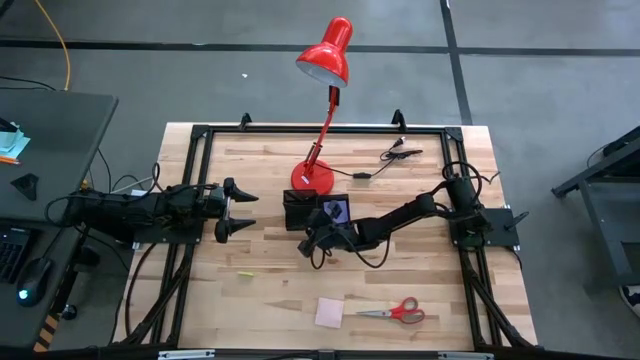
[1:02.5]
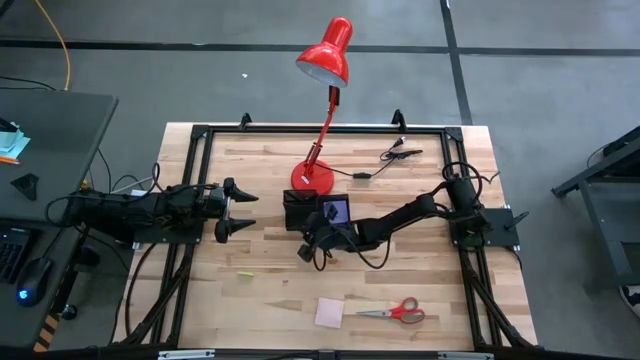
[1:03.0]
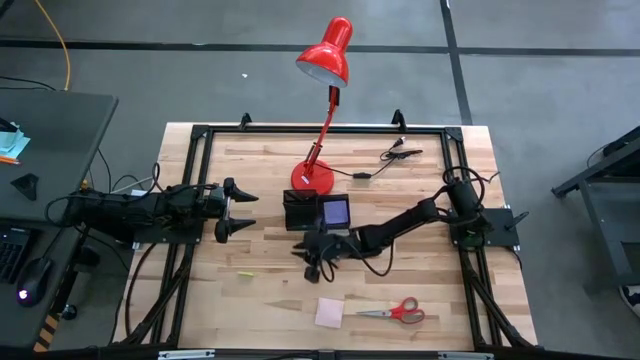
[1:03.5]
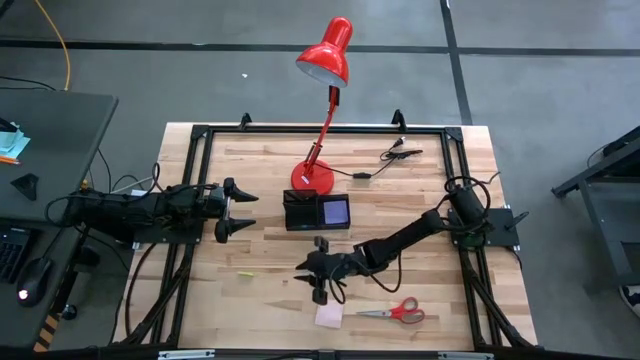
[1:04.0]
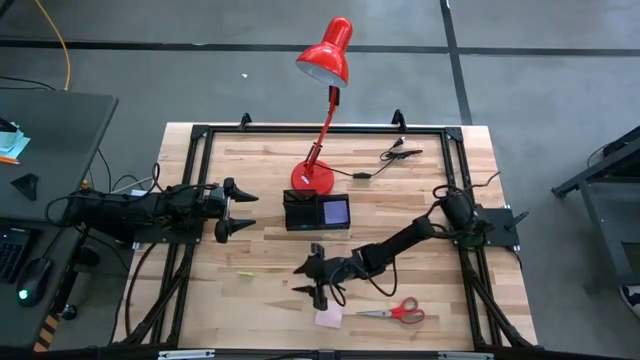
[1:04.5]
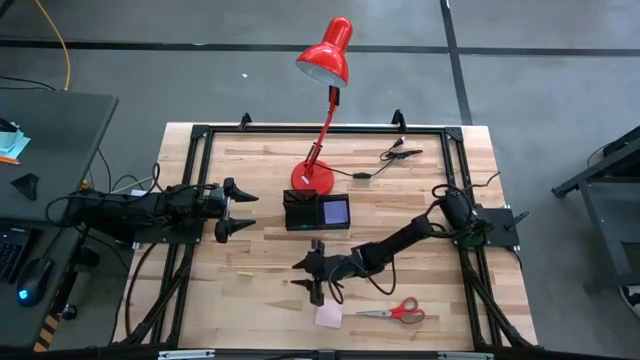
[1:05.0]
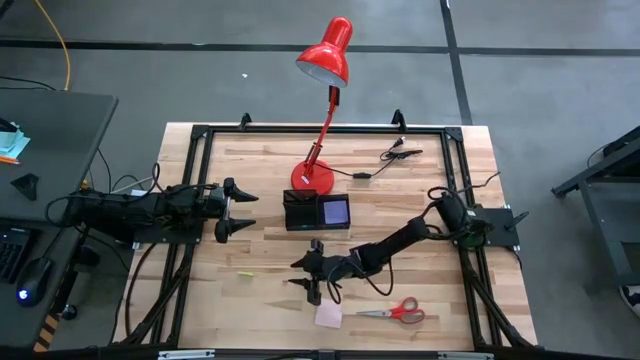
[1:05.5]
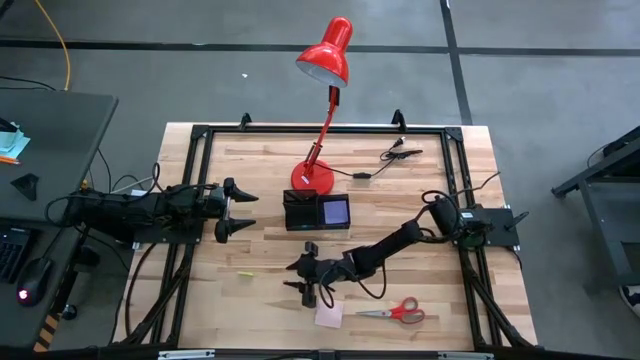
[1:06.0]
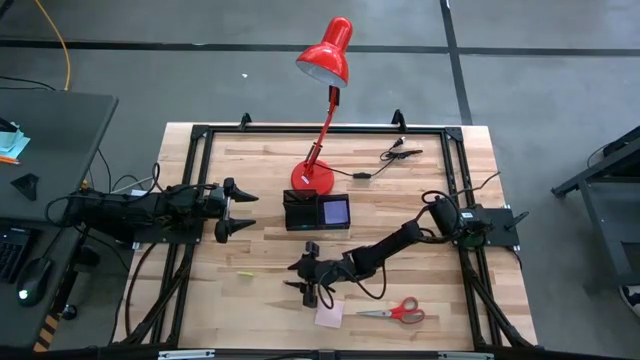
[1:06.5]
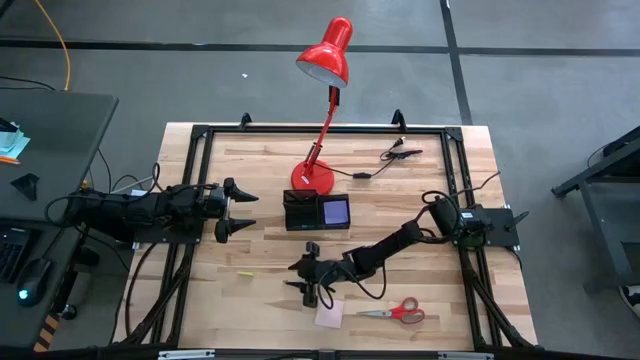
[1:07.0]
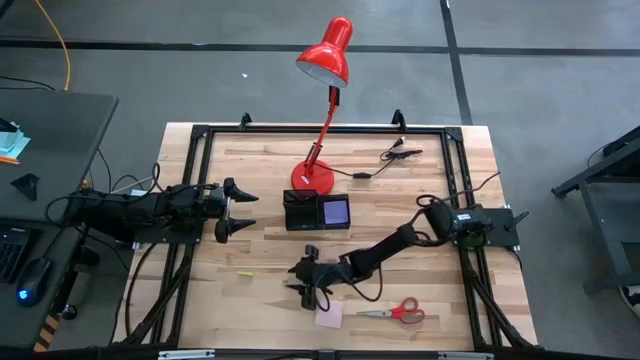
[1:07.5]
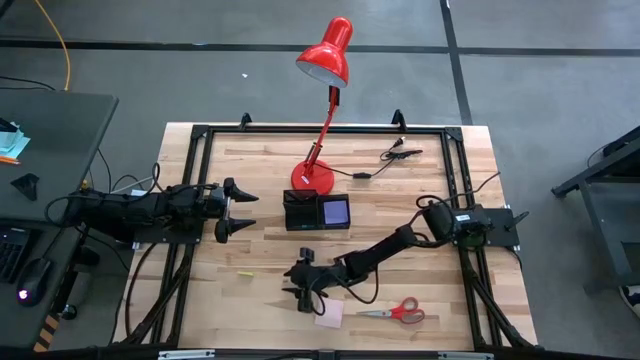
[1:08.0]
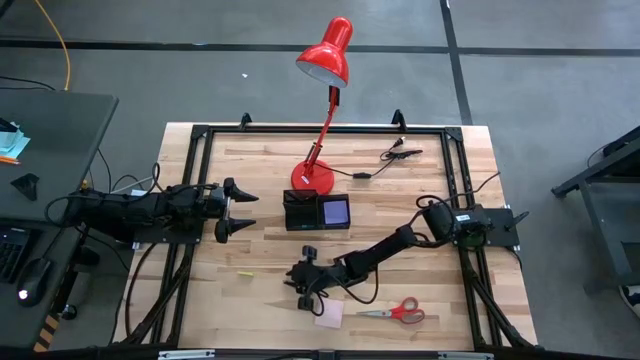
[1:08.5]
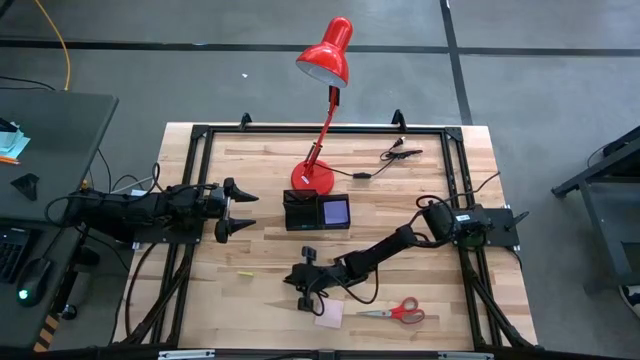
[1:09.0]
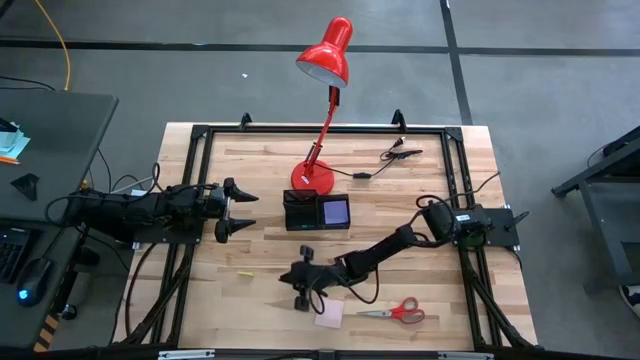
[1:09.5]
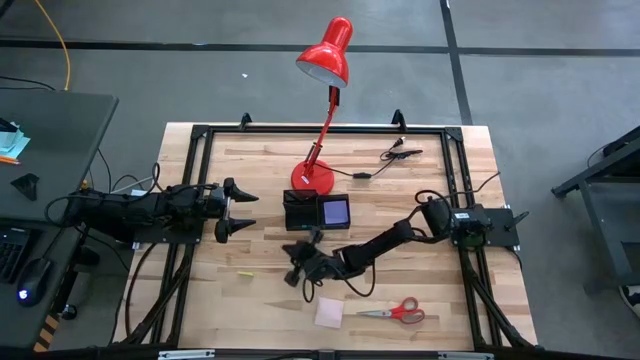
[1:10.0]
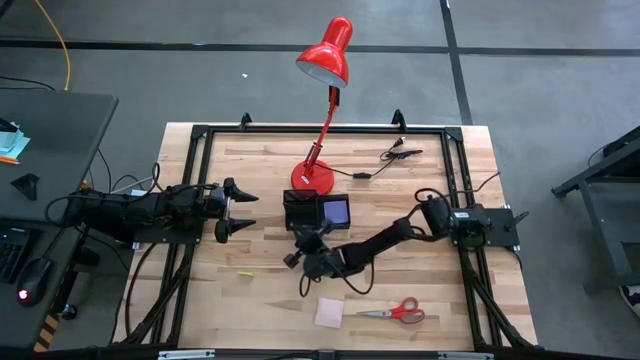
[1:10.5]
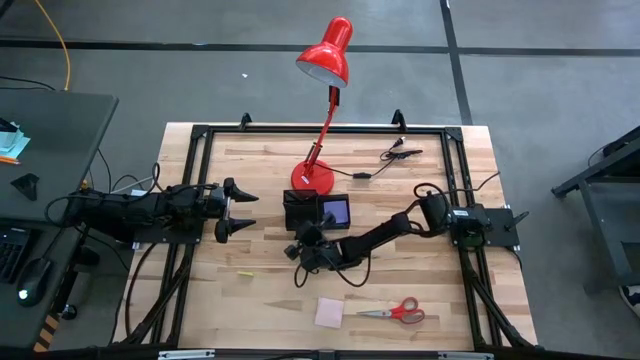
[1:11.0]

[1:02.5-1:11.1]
Task: Pick and place office supplies into organizer
Put the pink binder clip into the black desk organizer

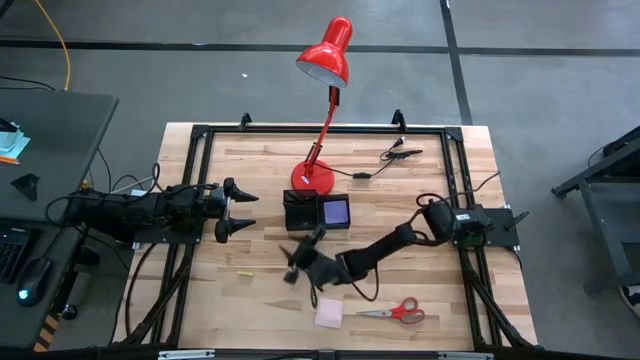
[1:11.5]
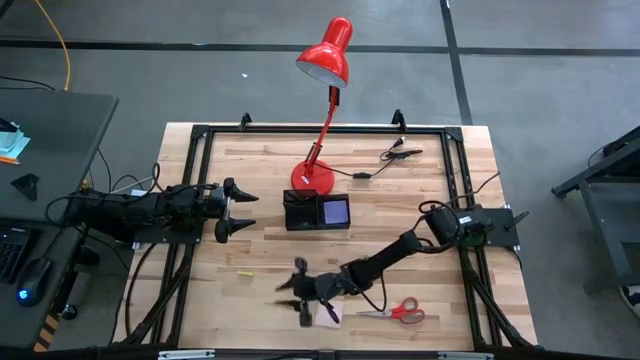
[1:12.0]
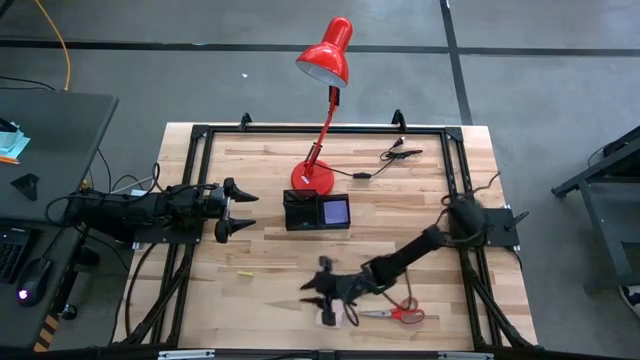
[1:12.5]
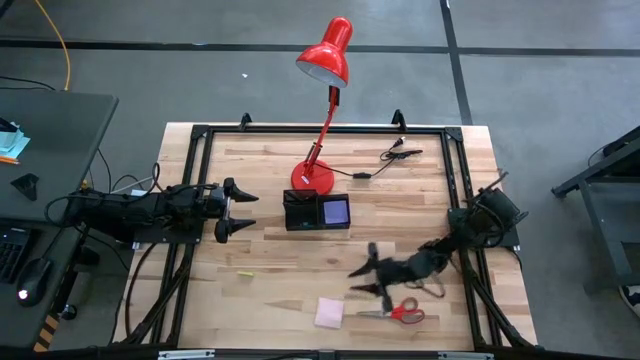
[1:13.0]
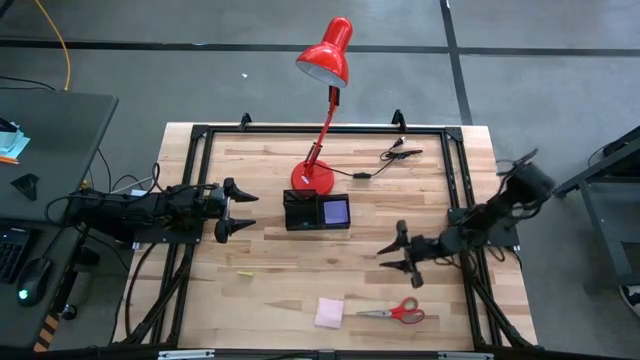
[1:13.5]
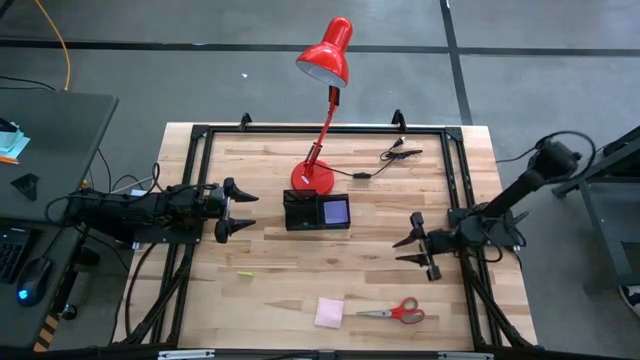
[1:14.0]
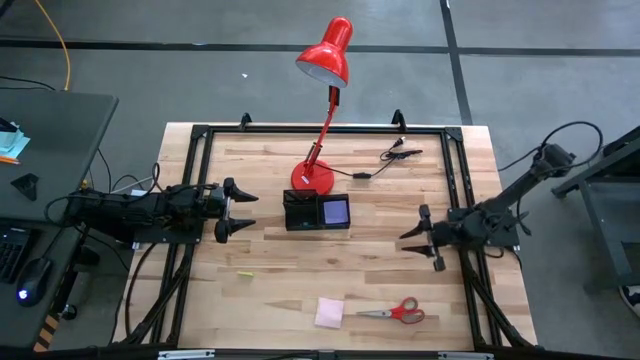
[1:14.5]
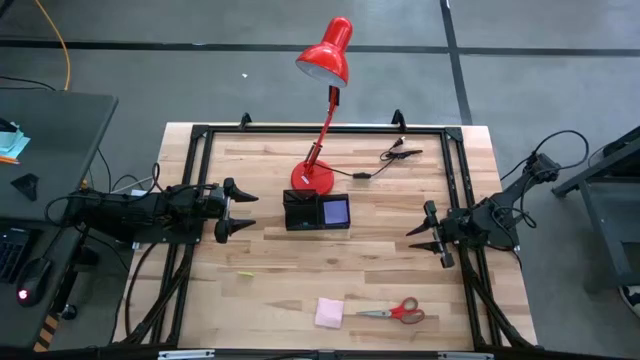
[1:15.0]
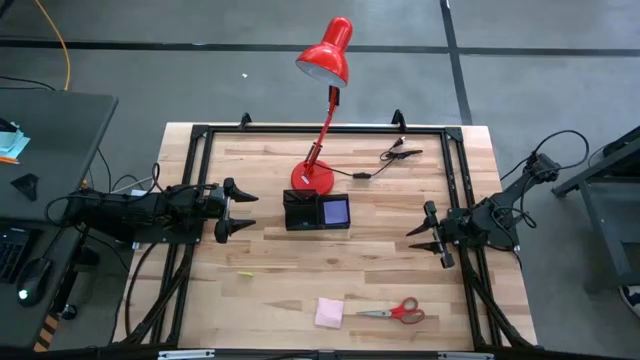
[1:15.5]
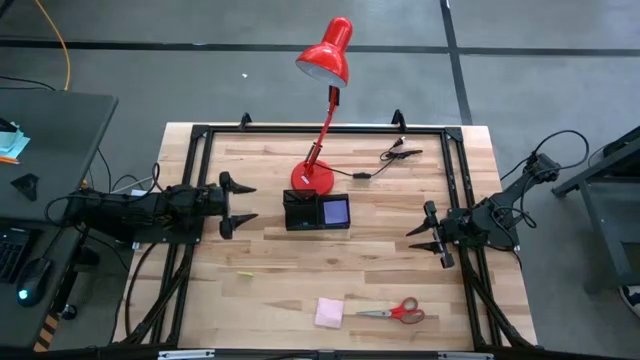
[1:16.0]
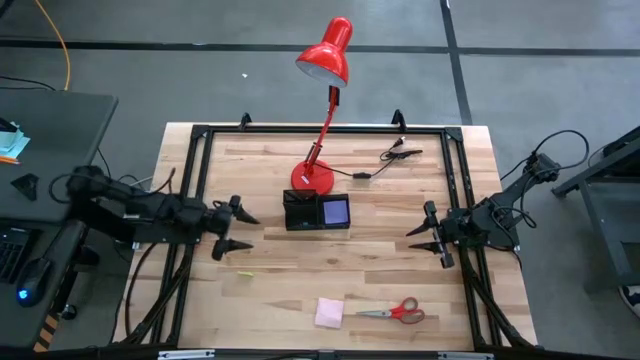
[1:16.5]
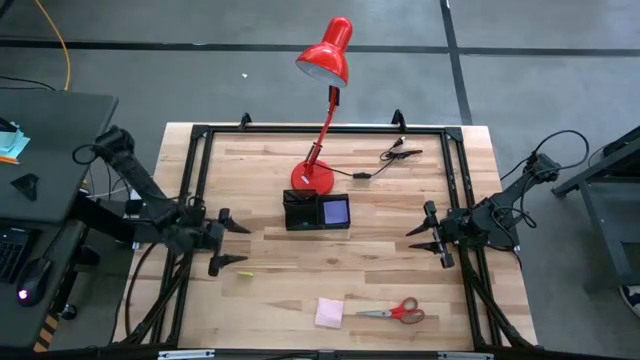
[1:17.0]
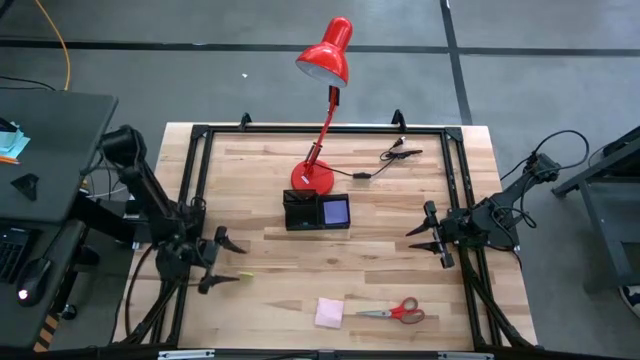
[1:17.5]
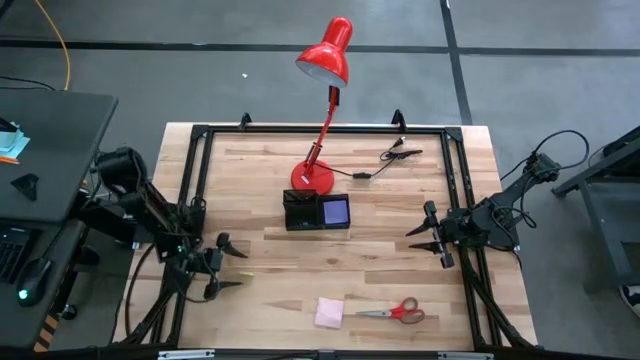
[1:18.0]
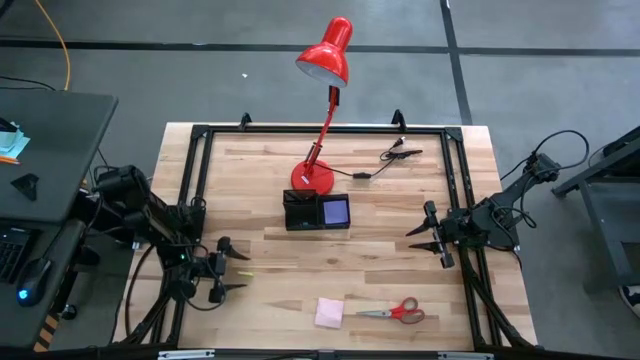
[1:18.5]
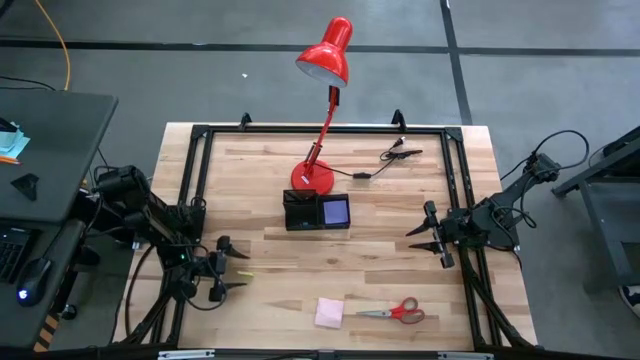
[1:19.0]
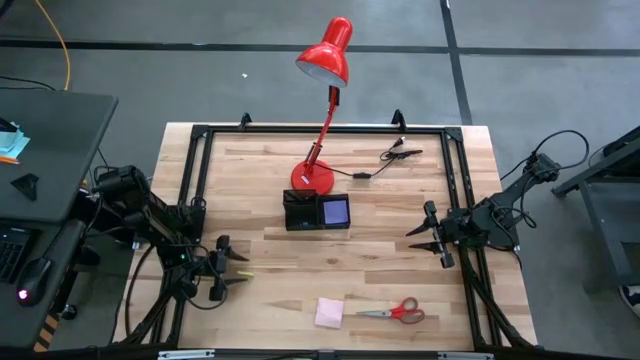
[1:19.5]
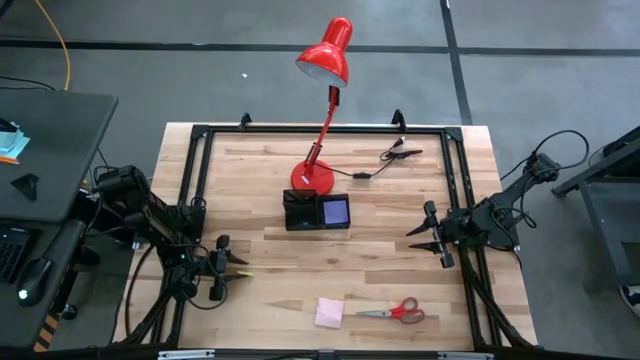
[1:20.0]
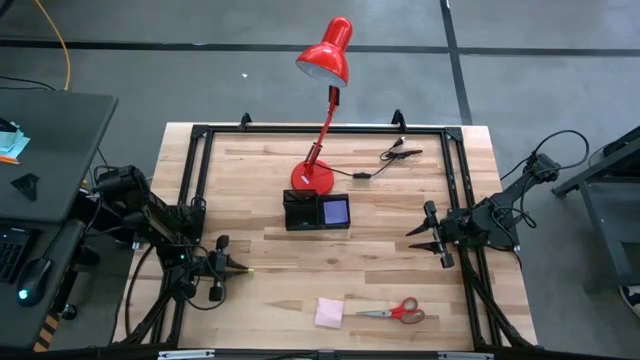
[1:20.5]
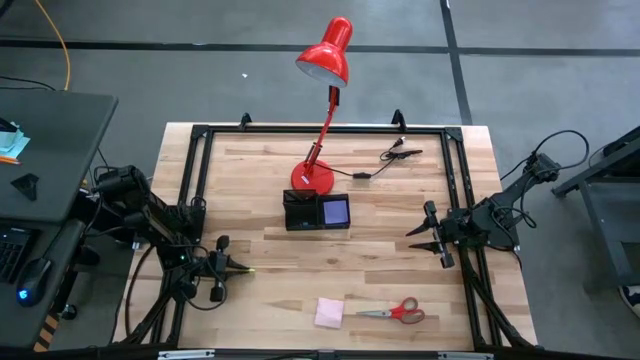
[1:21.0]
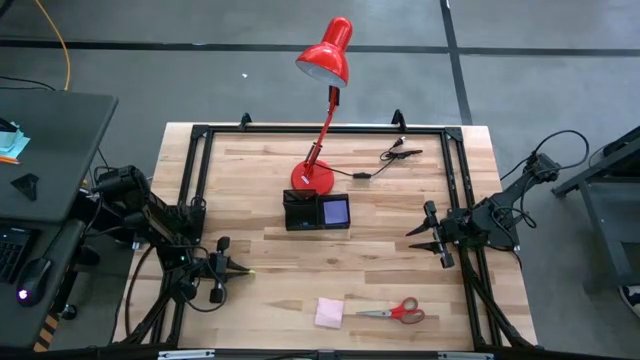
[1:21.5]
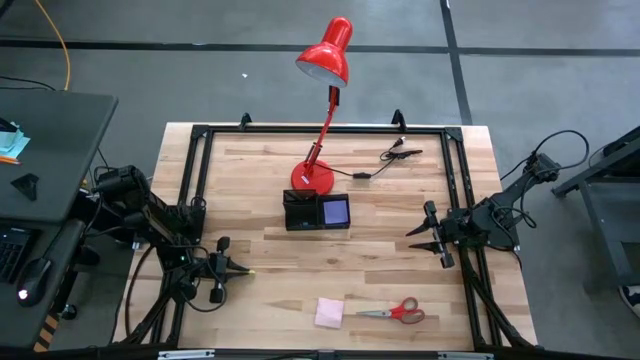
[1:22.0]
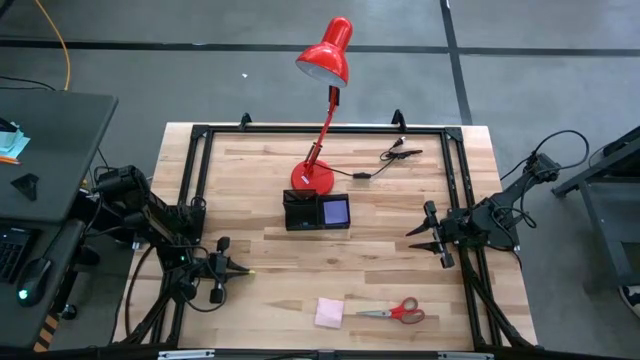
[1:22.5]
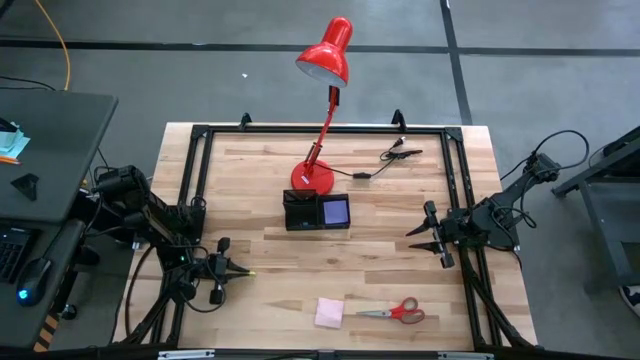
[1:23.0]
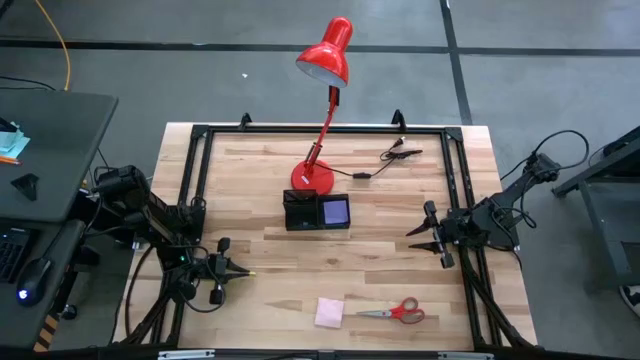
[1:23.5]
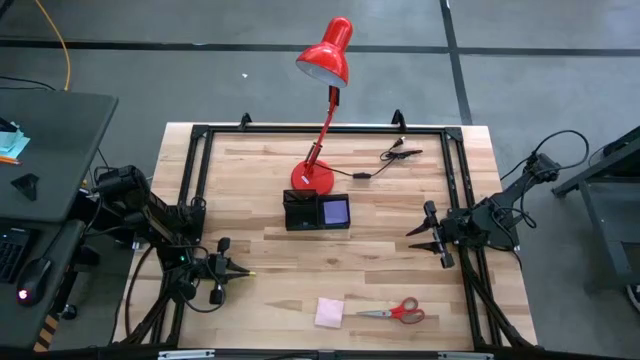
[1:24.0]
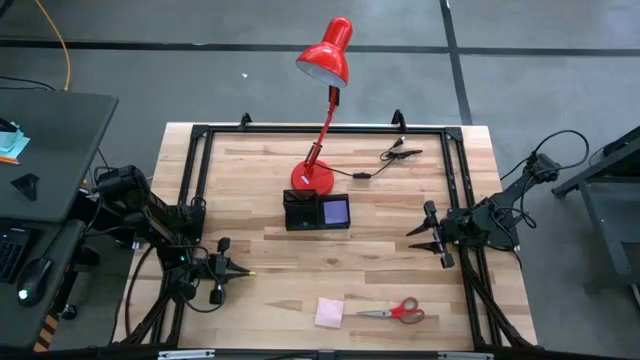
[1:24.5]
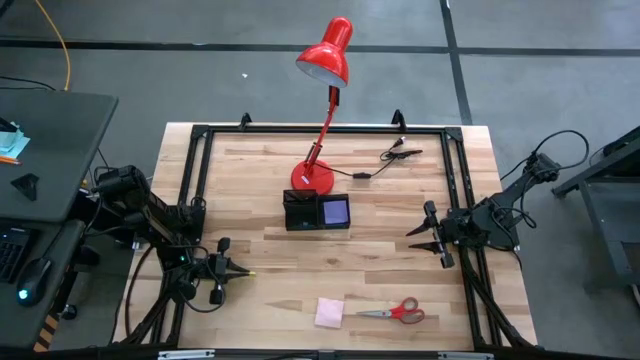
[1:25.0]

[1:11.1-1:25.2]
Put the green eraser into the black desk organizer
